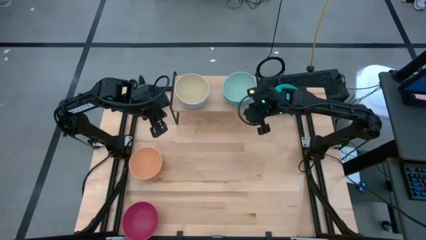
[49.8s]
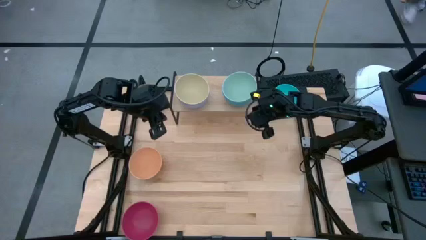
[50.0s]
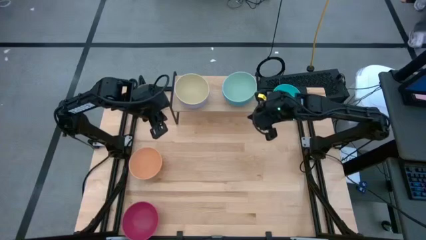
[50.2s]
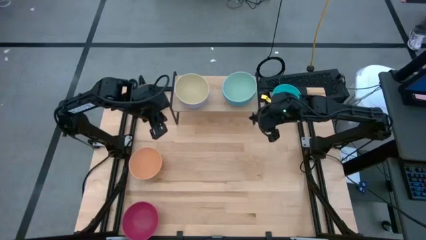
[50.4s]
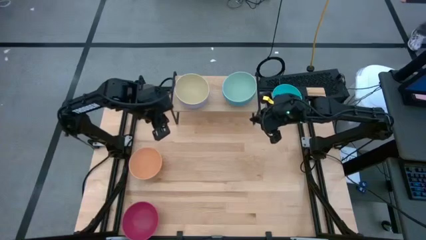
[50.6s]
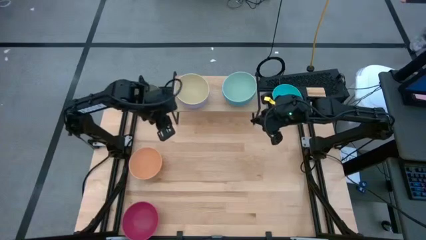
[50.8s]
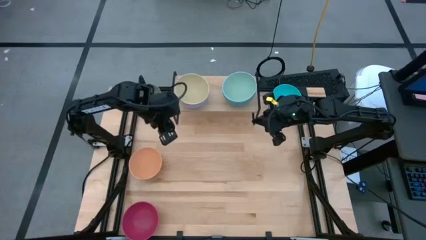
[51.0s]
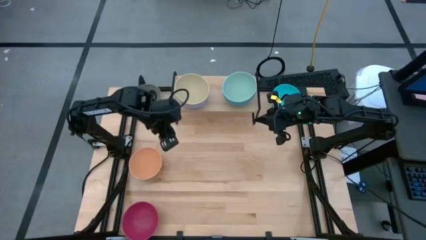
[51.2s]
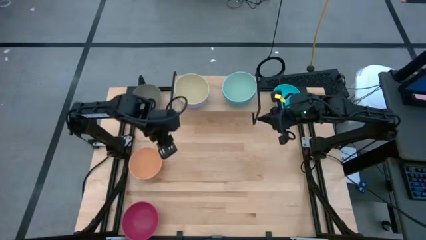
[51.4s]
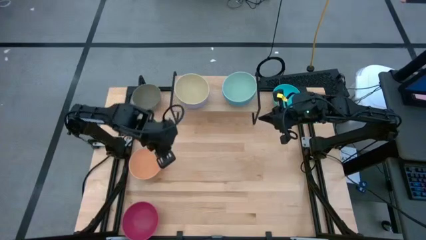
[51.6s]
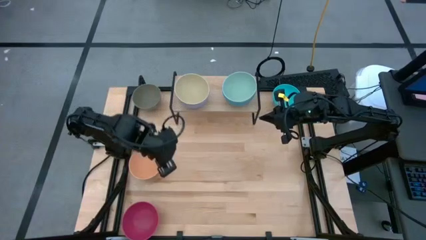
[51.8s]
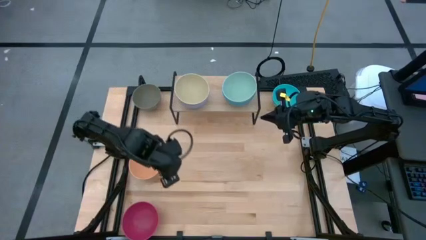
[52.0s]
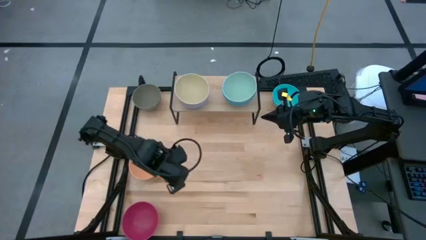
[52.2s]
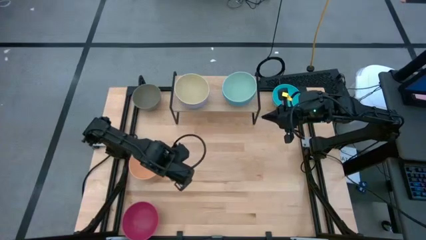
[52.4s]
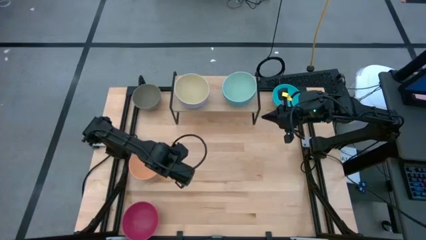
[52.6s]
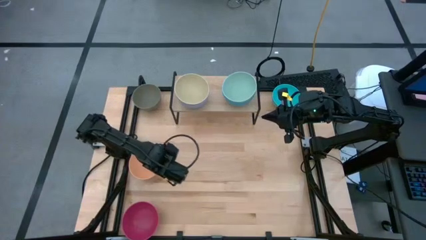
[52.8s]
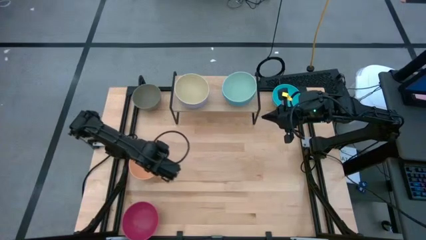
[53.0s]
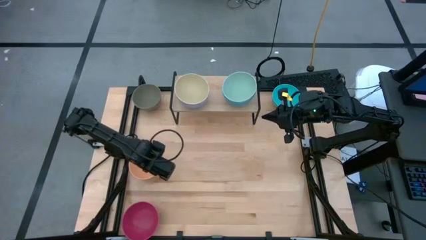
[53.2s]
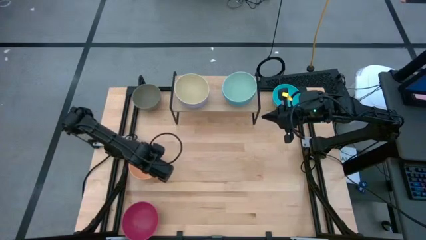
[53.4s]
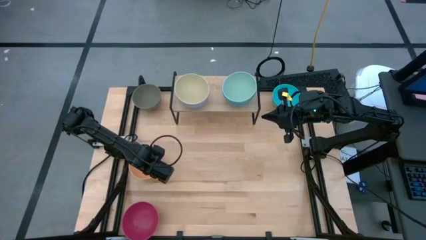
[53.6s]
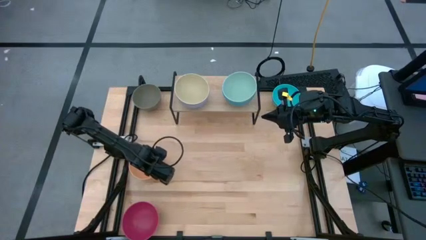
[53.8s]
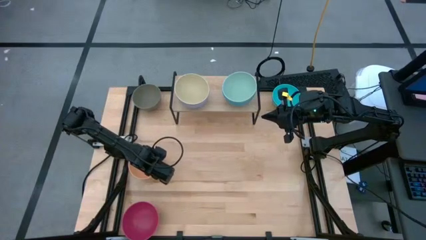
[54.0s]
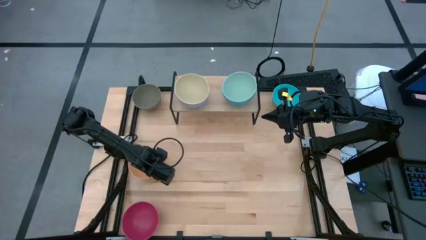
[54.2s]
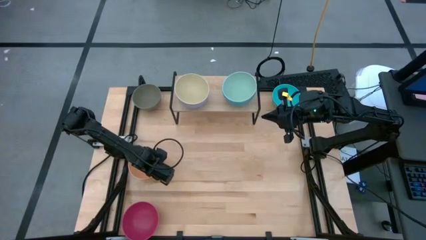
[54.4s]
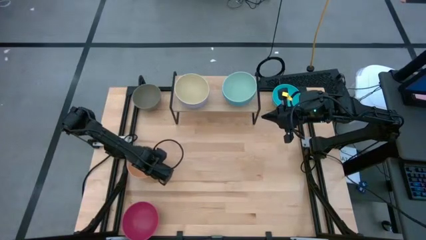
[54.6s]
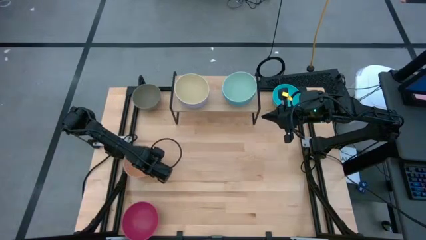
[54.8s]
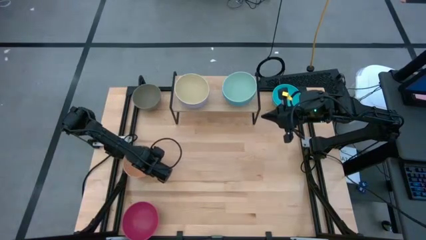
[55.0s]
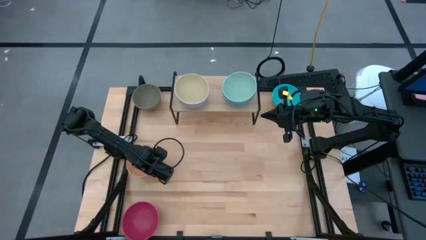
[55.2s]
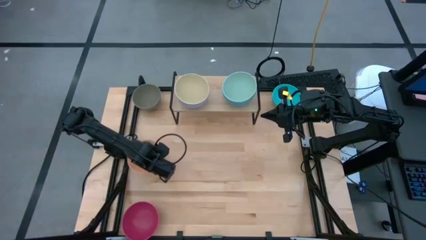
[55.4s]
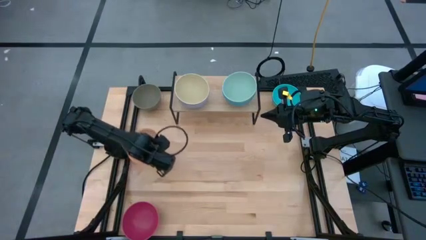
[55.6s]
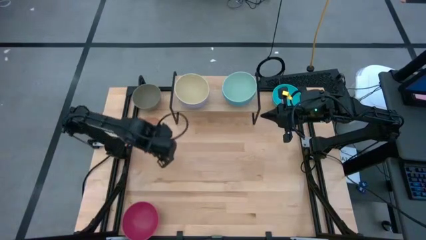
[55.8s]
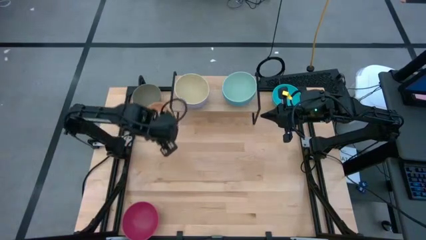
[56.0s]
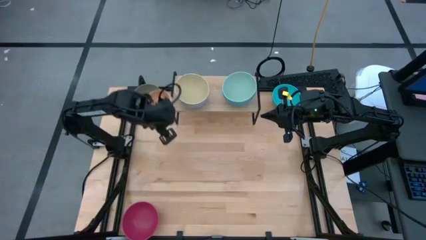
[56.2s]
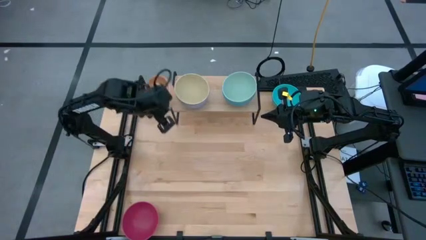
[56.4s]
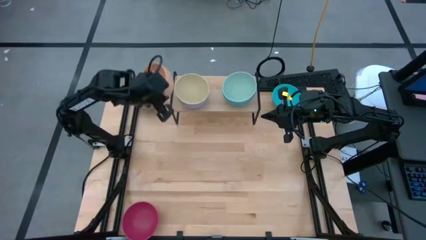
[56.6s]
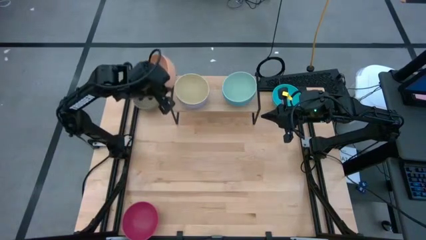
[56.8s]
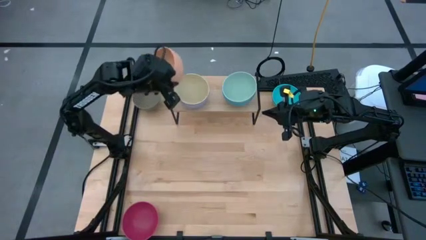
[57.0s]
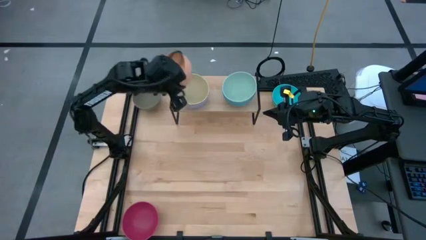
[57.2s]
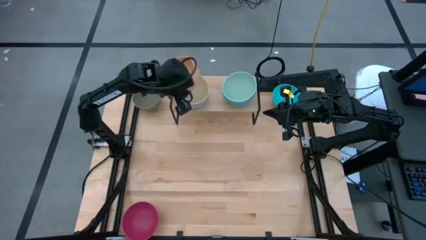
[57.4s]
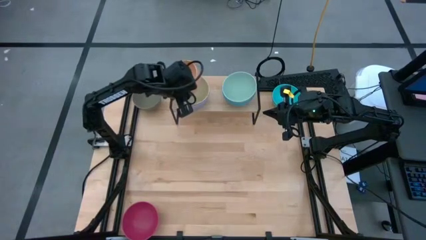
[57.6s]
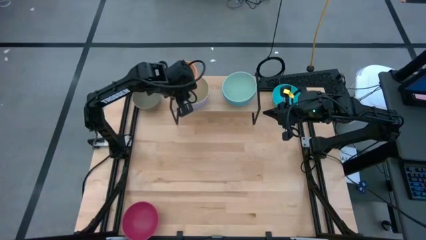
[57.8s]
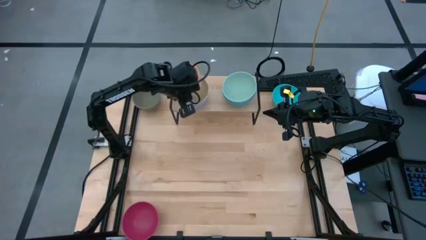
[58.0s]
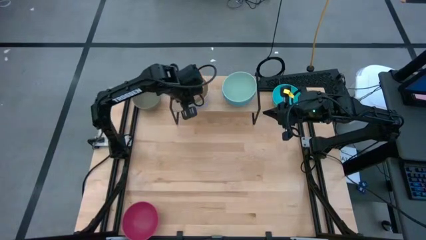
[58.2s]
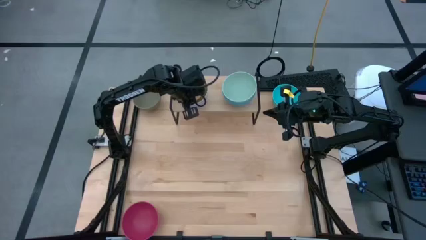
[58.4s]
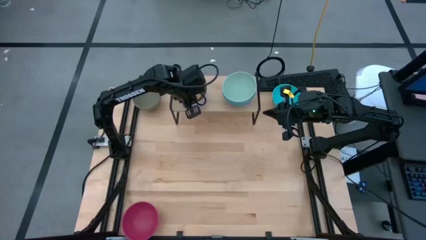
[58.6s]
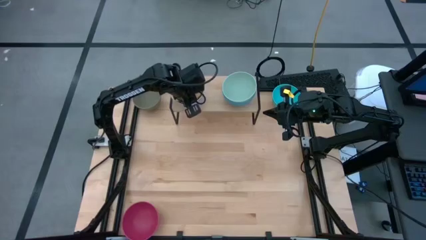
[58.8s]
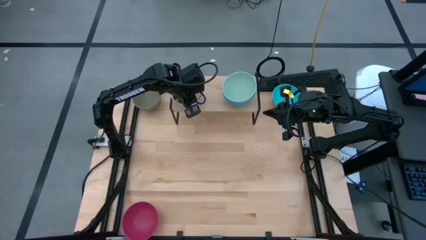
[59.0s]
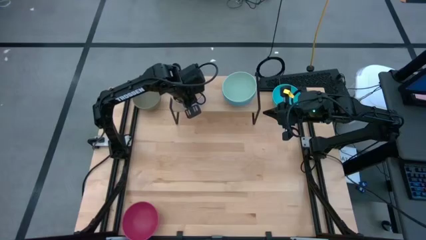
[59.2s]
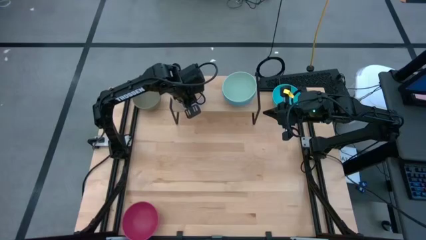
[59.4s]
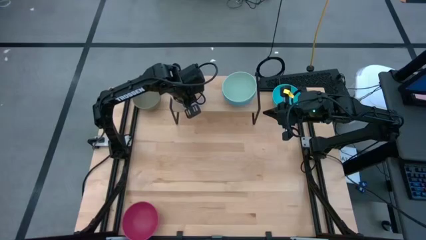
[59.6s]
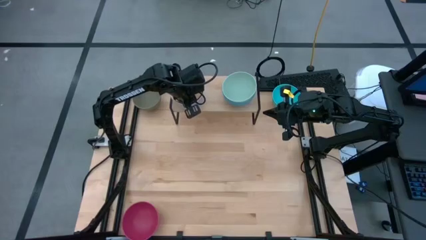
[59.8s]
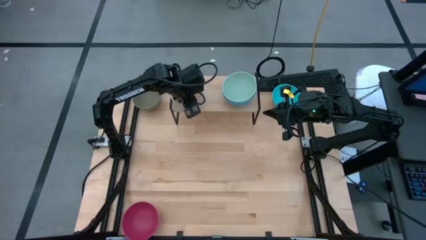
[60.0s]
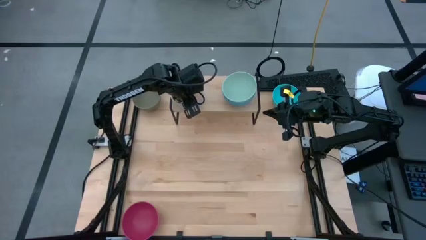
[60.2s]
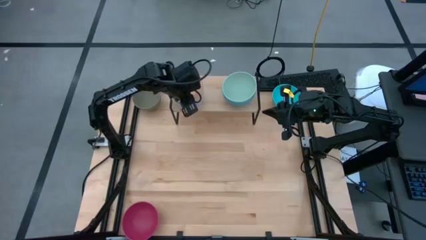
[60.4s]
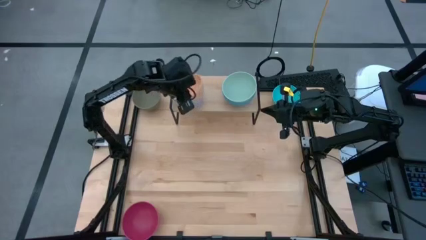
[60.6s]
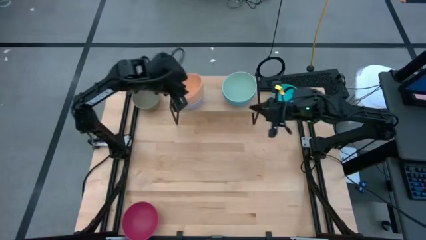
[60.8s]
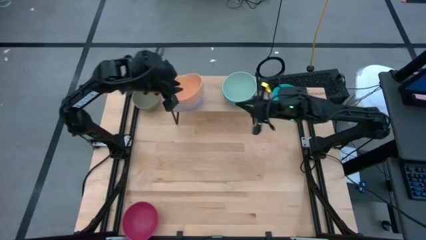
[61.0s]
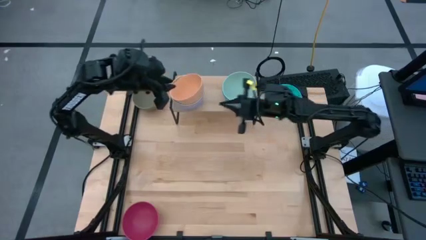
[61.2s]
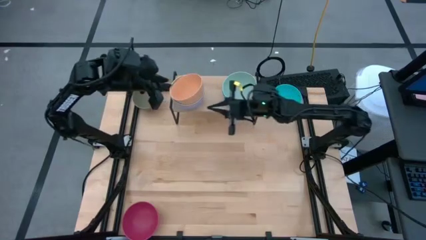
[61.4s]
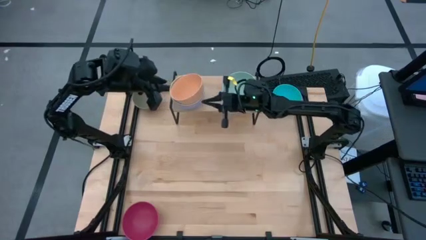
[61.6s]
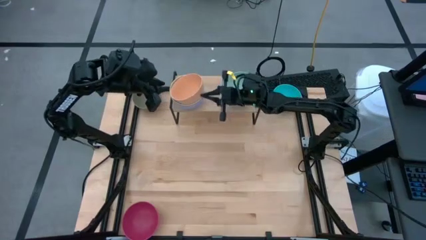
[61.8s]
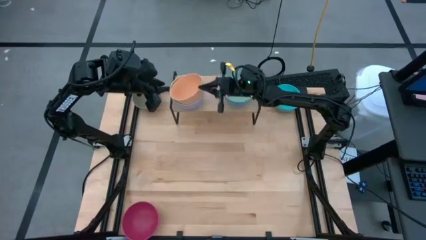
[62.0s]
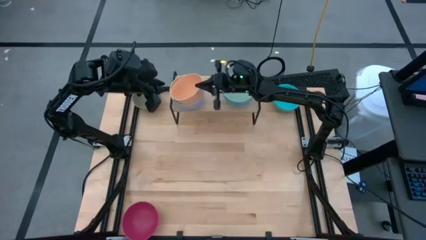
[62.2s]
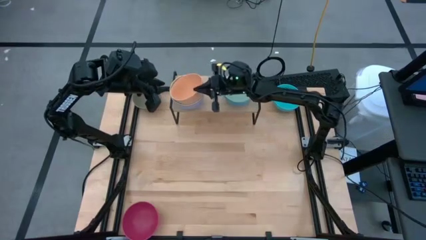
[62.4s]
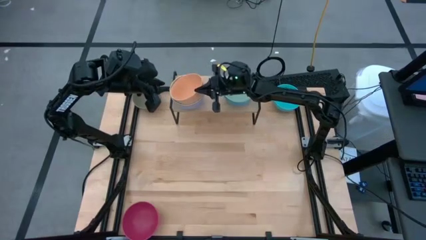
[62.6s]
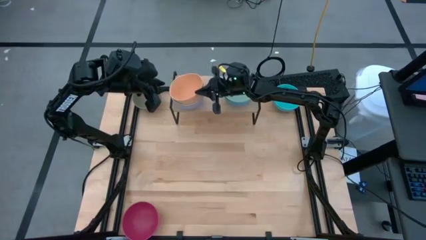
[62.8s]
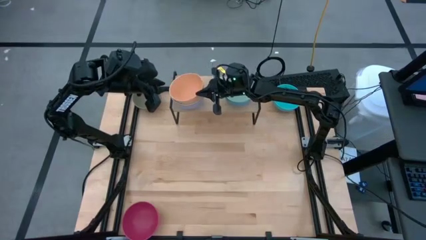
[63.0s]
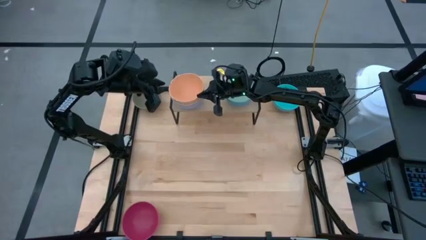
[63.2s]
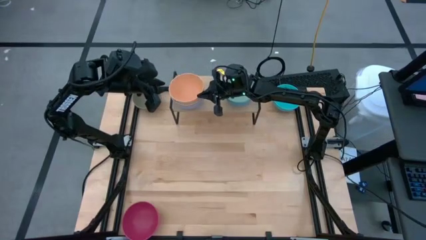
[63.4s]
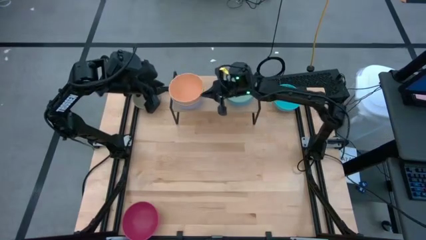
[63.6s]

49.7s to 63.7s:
Task: Place and stack bowls onto a shelf
Put the orange bowl on top of the light brown bowl on the shelf

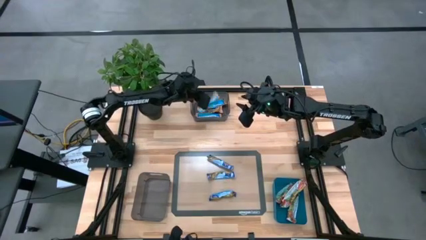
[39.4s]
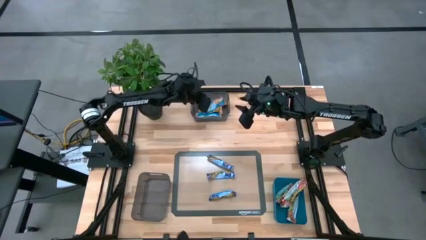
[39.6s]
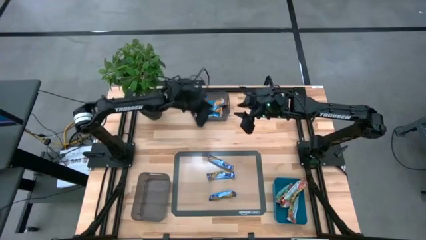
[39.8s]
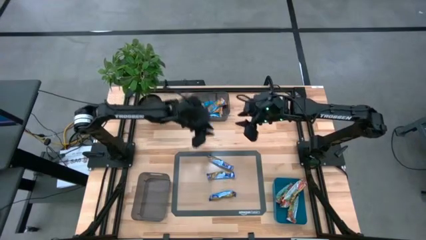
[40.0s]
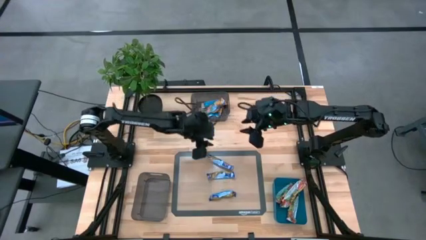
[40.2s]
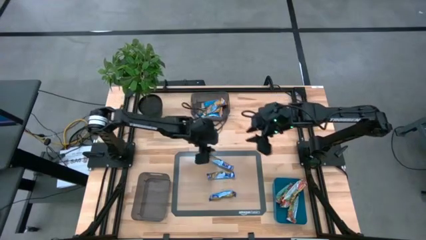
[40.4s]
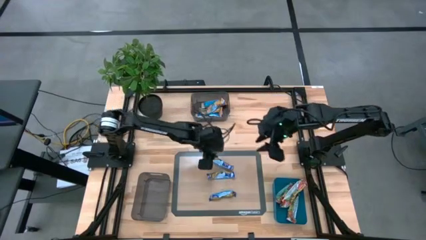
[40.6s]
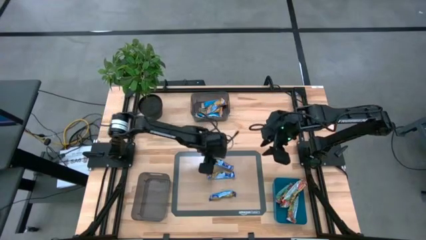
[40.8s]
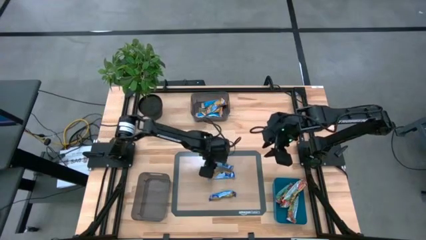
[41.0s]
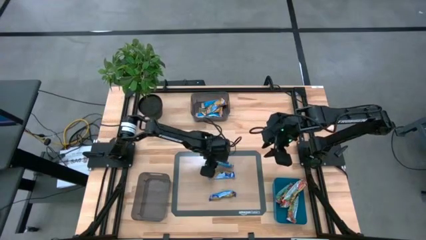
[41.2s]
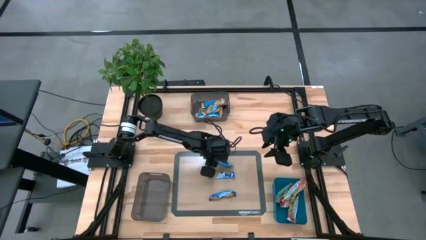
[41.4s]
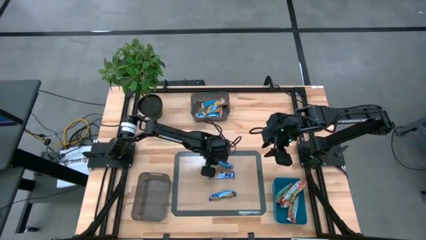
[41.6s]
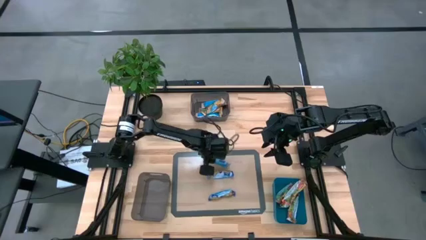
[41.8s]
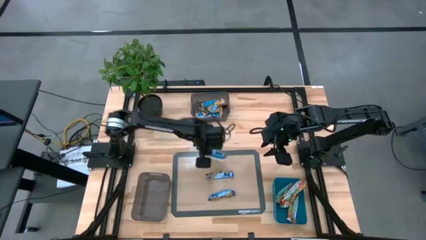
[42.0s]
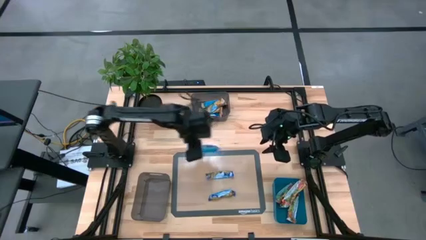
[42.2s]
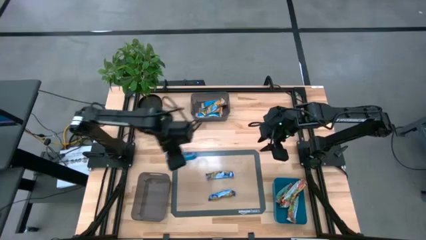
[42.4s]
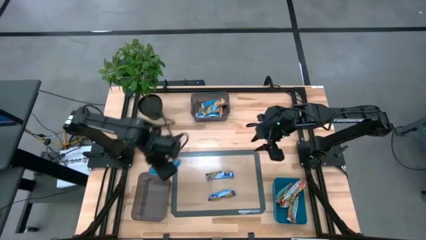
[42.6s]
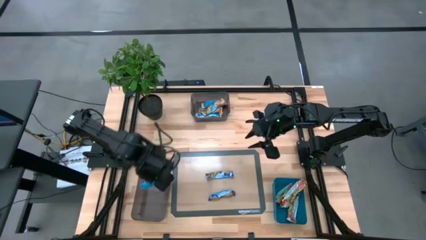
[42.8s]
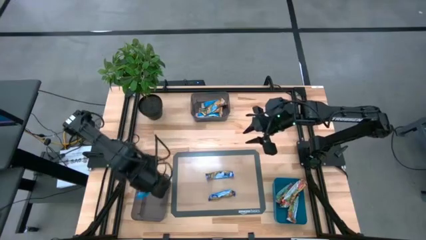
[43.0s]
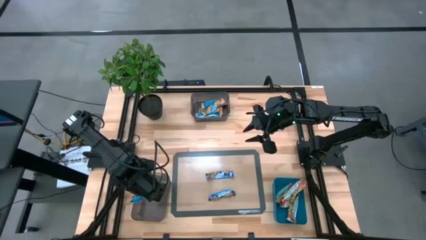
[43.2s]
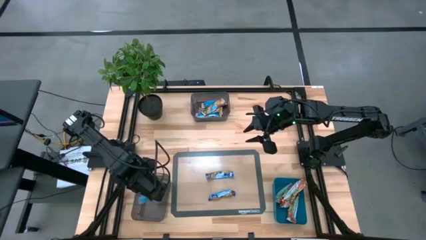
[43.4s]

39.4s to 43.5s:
Task: Pick and place Granola Bars by type
Put the blue granola bar into the bottom black transparent bin
